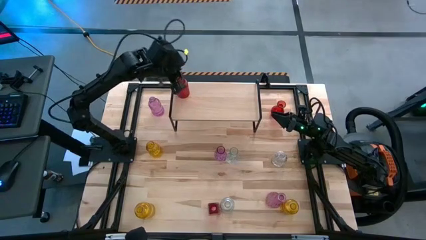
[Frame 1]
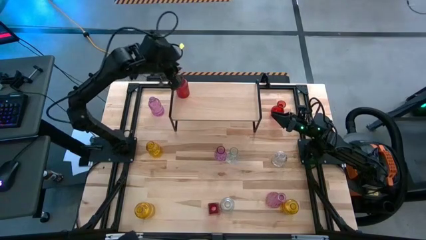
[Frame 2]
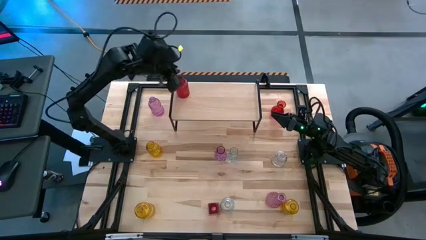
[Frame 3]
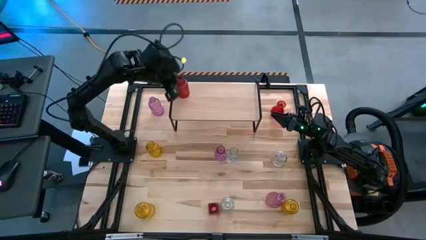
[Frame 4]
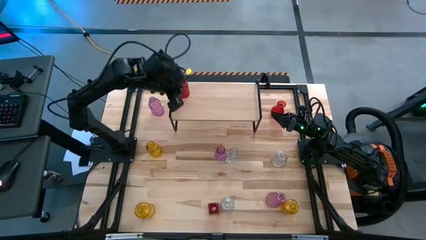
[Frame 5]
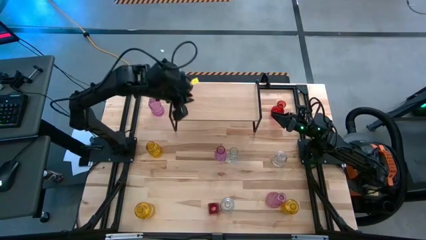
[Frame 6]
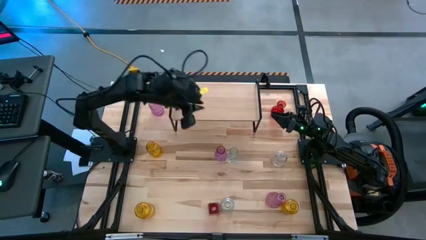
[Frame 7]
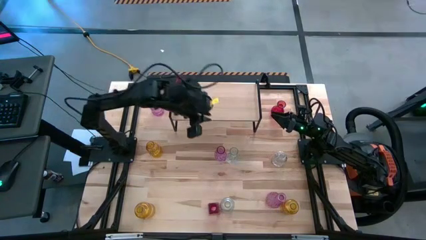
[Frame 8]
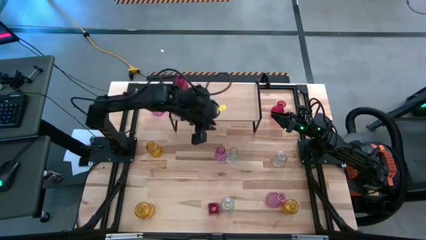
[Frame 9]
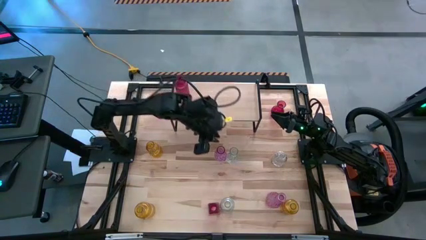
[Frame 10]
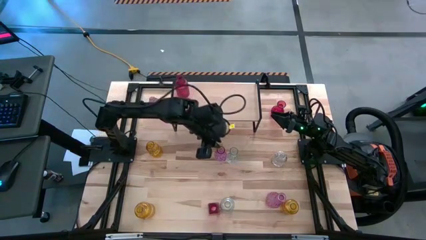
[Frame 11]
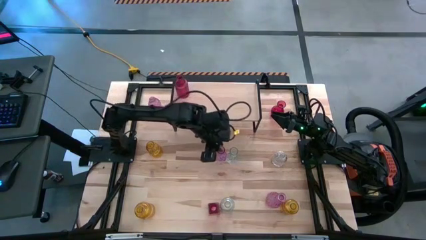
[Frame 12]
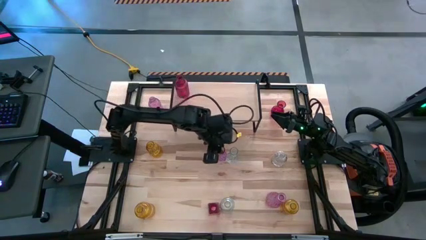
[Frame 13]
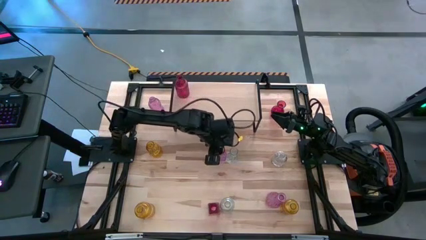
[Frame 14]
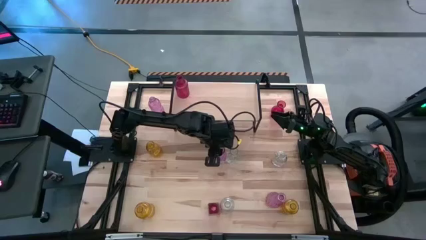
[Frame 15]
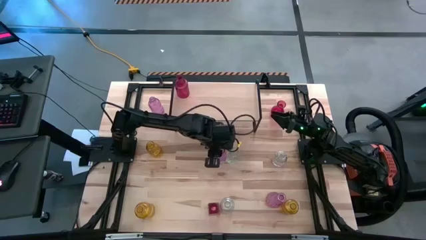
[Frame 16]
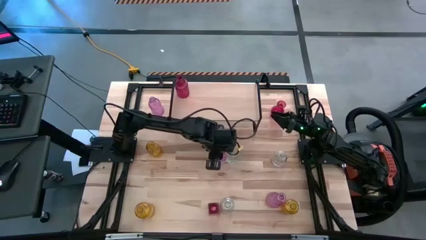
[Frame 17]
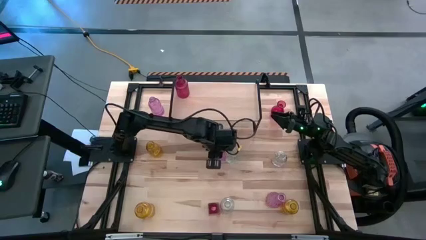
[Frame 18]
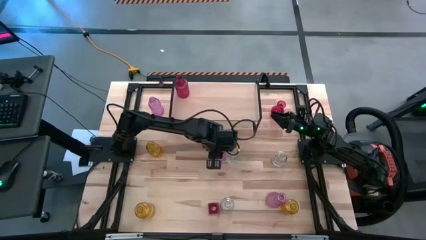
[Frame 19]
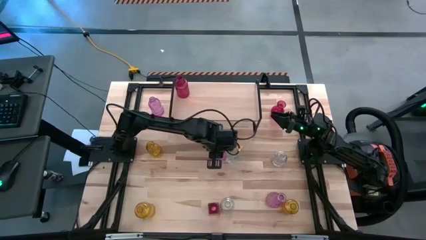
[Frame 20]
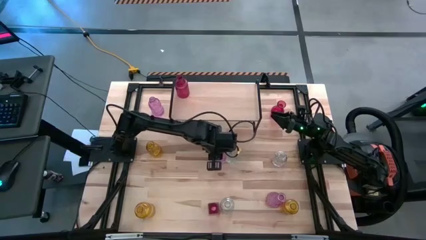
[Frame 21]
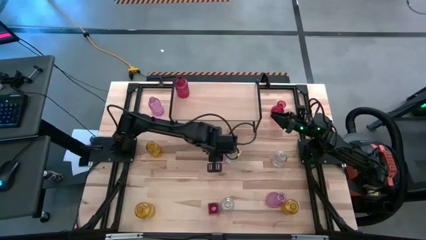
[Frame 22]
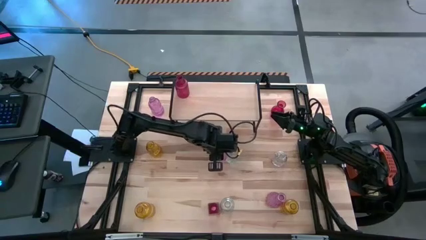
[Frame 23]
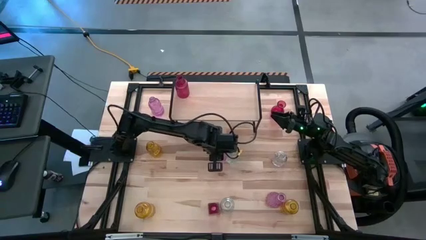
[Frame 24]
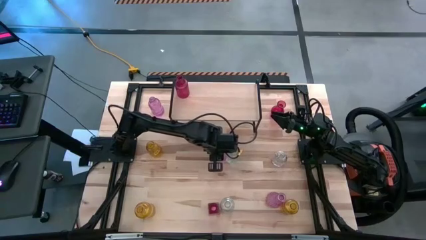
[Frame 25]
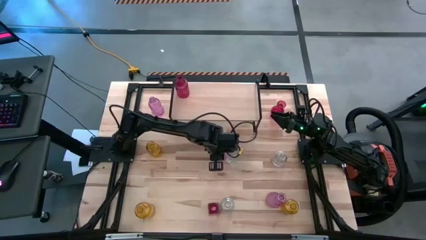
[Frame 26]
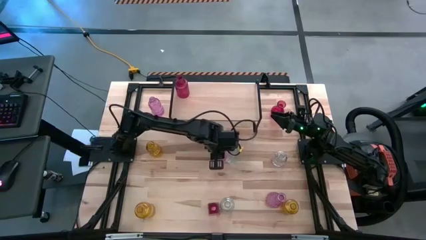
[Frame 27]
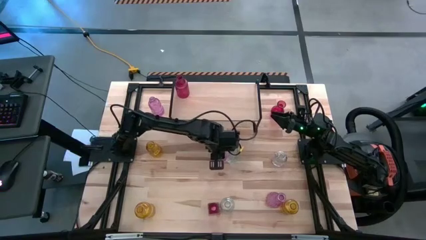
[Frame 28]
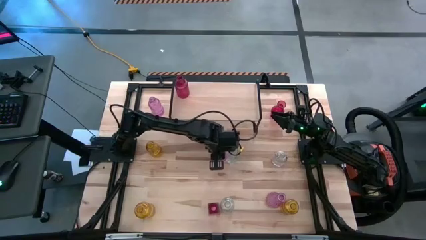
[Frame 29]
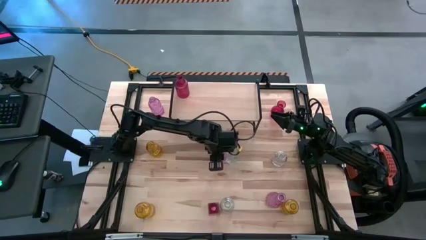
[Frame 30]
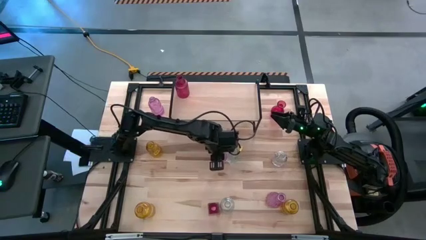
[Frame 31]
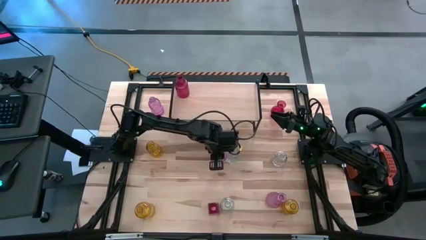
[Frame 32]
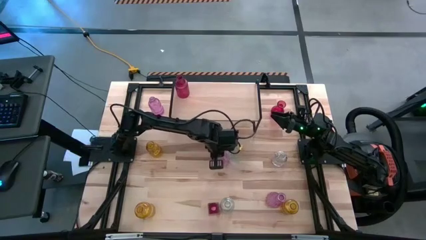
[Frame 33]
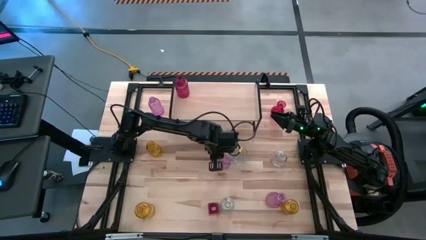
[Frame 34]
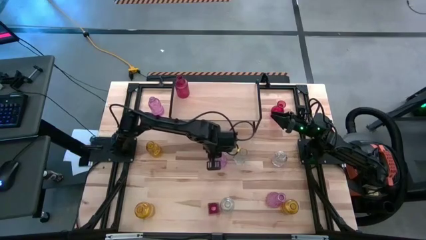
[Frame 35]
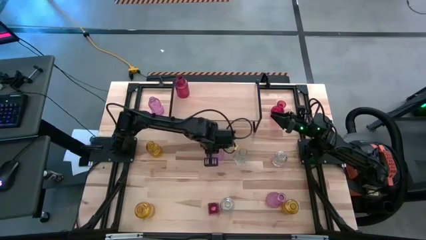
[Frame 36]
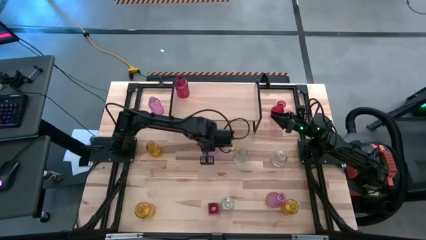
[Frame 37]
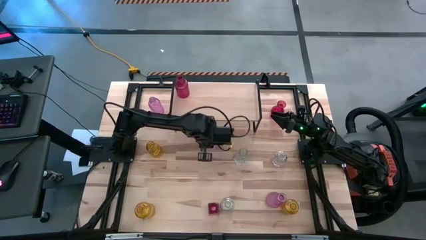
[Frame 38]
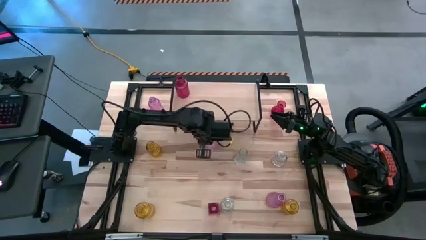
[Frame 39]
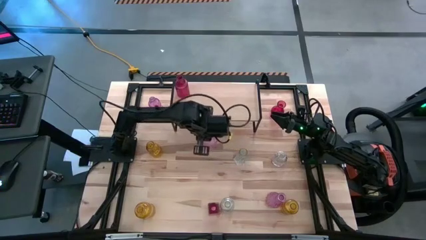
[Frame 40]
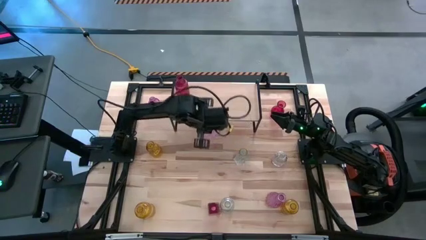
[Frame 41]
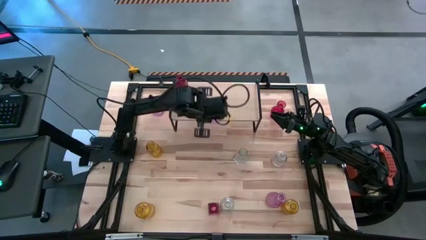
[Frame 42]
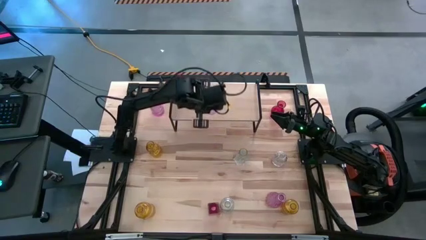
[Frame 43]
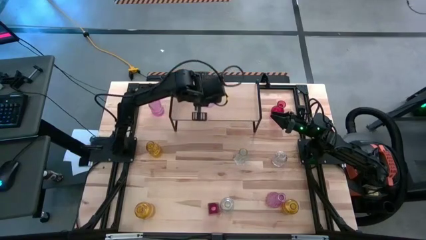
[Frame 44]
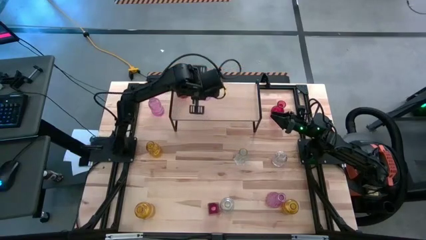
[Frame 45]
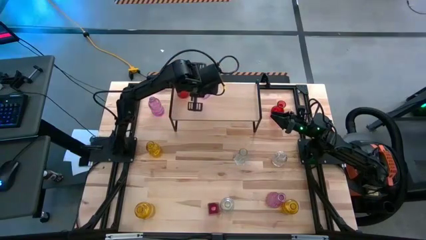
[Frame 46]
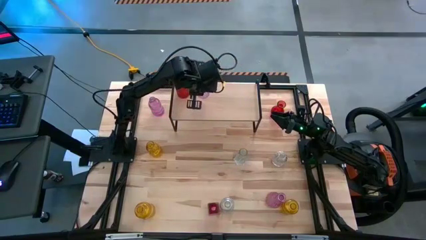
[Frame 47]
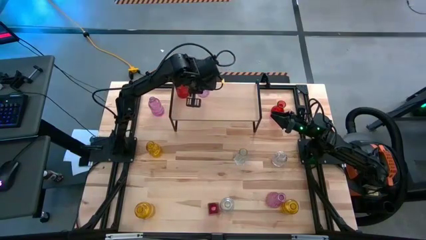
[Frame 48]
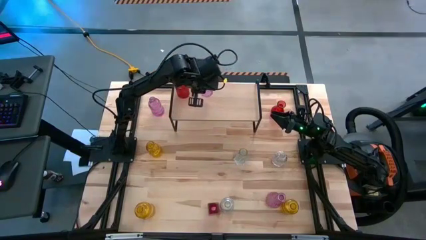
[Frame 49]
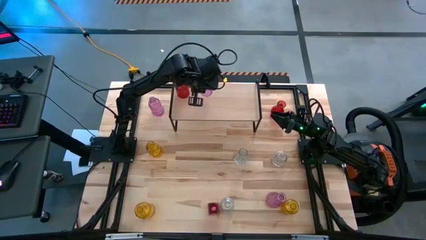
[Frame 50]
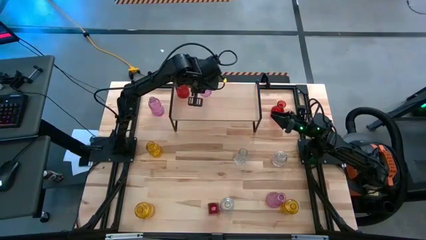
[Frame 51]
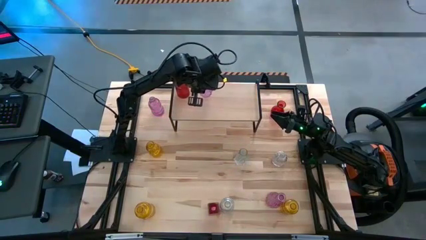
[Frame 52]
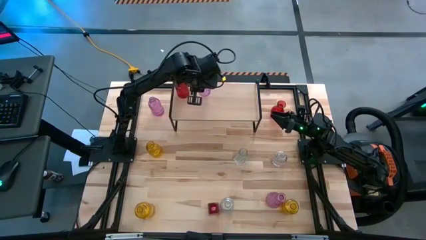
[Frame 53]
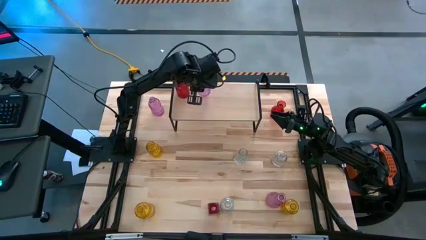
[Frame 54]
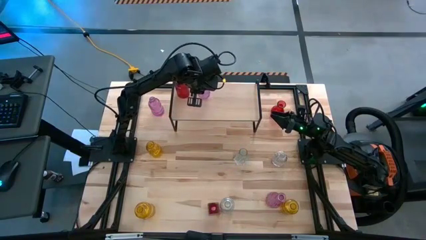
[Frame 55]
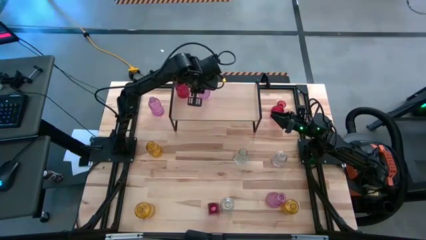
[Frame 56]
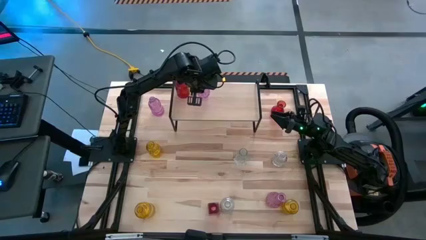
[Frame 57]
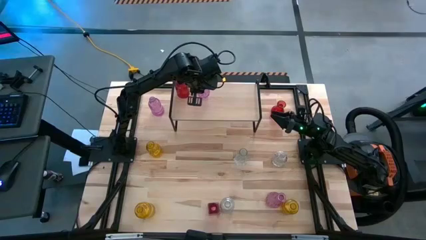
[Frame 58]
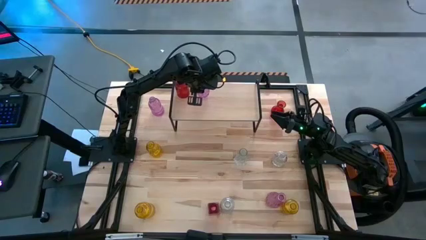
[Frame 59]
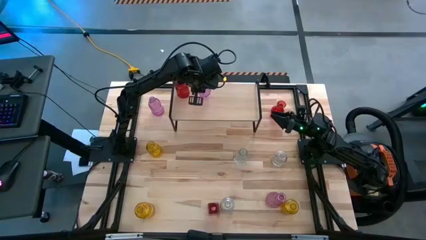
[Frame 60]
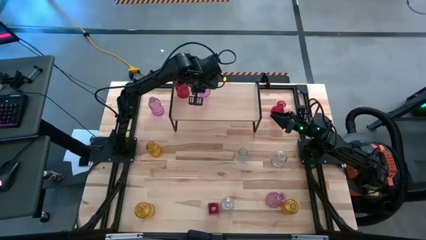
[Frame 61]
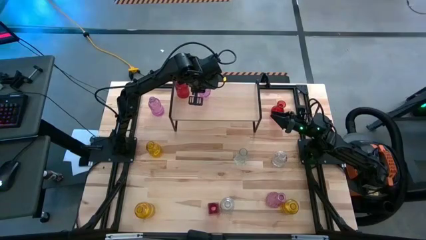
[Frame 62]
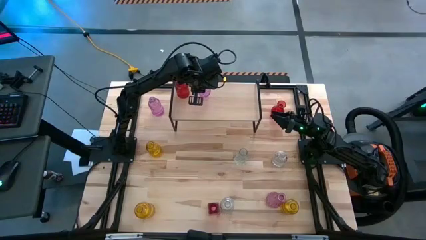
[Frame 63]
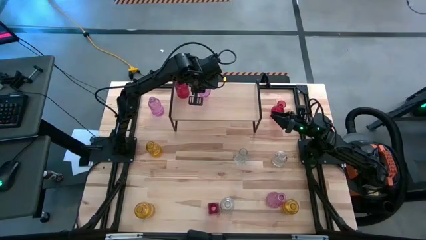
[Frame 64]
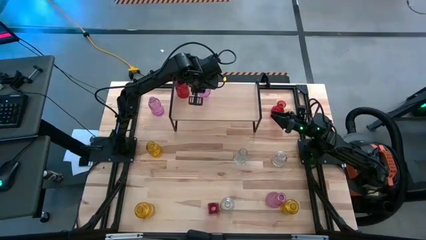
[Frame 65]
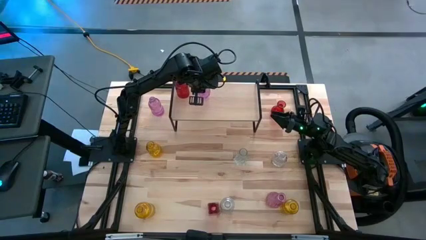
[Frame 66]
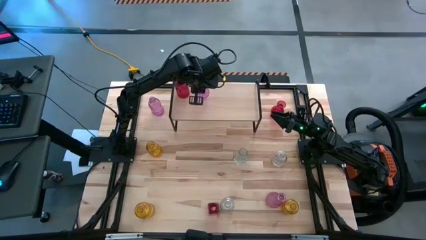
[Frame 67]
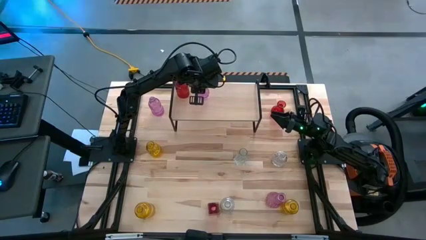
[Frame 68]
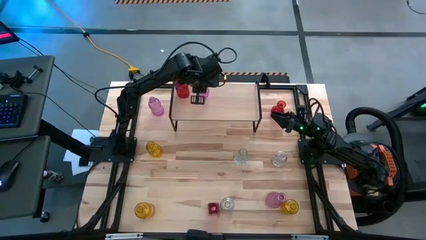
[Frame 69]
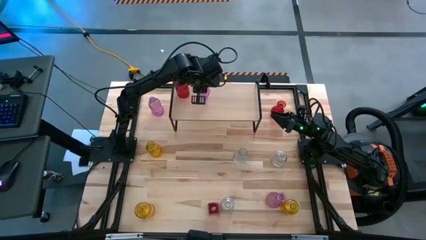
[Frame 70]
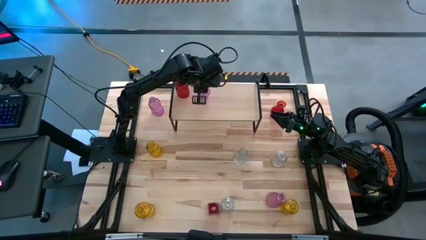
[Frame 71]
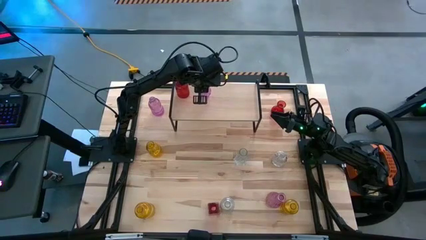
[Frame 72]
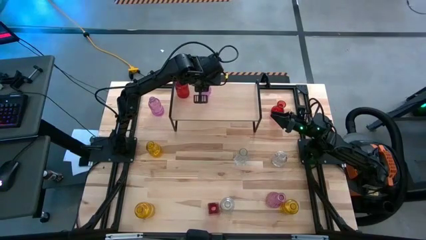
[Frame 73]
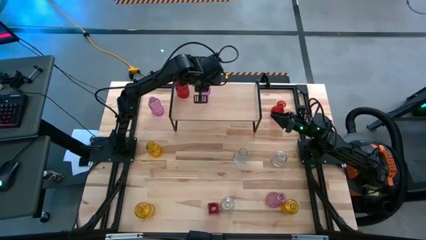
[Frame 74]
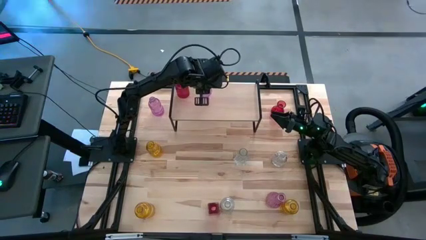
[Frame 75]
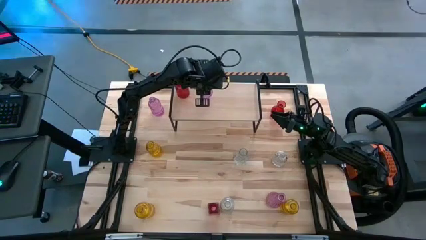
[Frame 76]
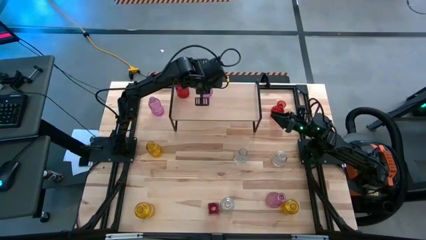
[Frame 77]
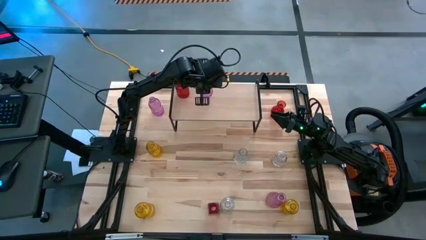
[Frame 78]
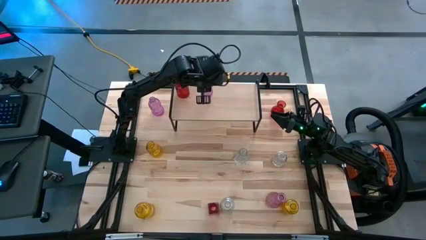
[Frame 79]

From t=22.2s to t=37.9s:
Task: sort vases onto shelf
Put the middle pink vase on the shelf
